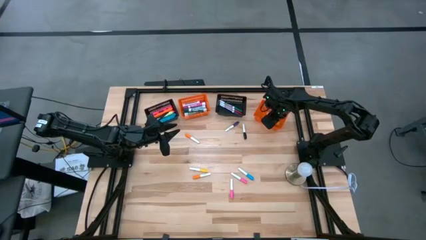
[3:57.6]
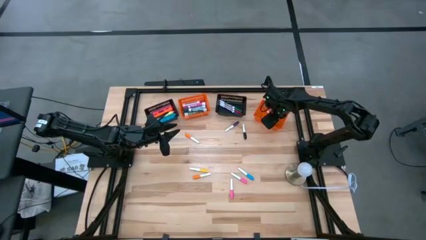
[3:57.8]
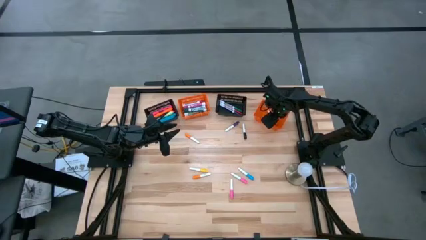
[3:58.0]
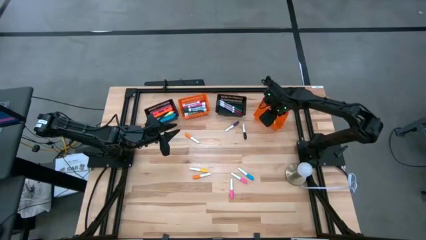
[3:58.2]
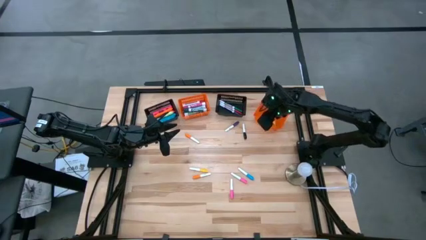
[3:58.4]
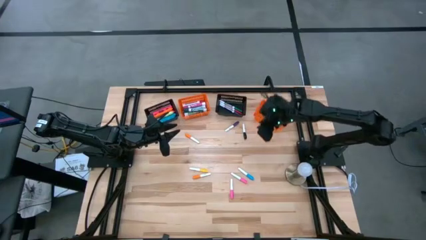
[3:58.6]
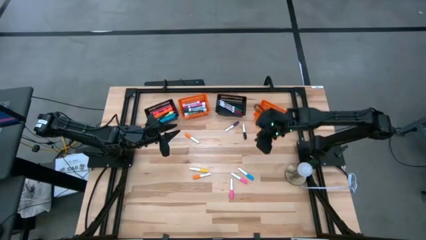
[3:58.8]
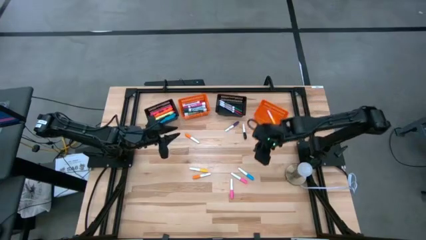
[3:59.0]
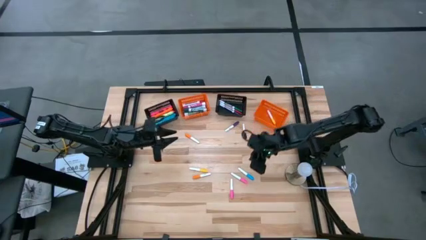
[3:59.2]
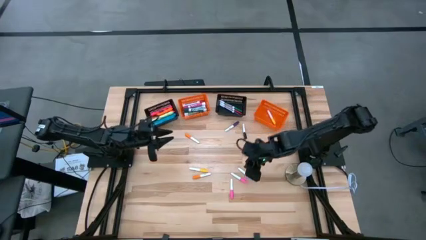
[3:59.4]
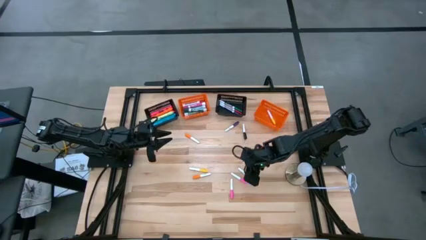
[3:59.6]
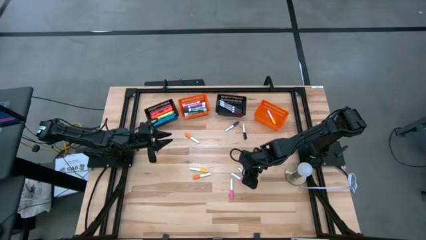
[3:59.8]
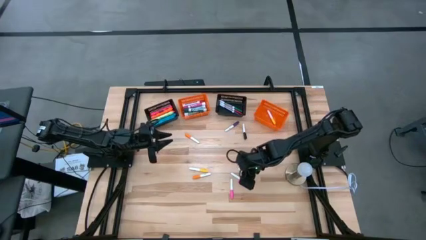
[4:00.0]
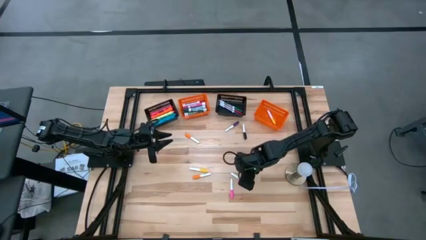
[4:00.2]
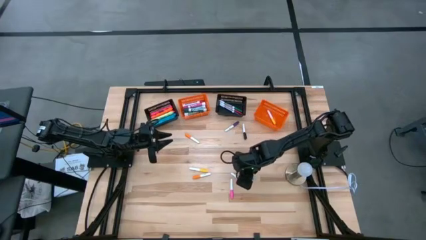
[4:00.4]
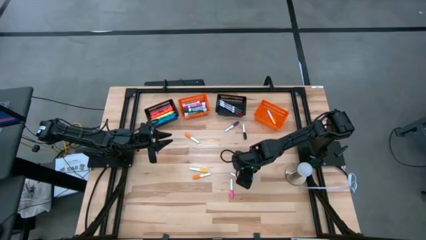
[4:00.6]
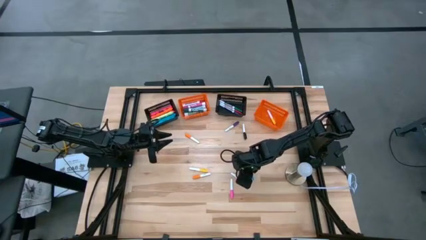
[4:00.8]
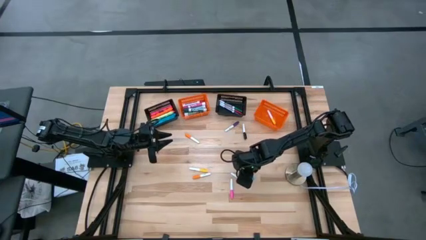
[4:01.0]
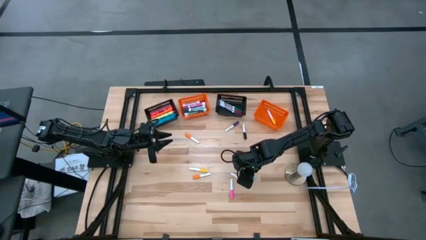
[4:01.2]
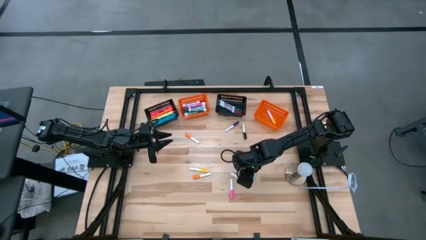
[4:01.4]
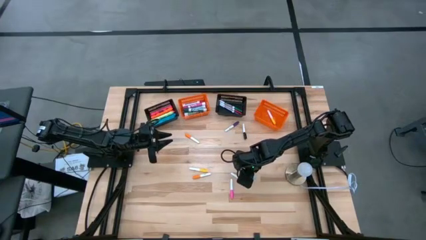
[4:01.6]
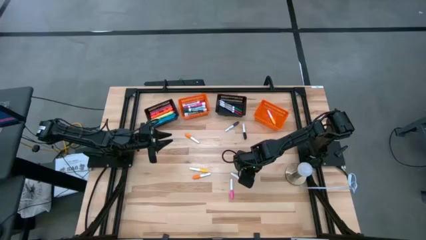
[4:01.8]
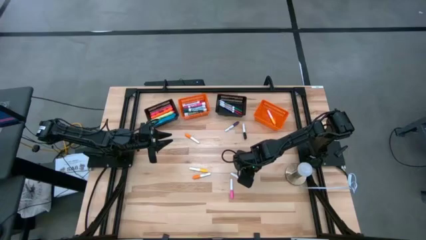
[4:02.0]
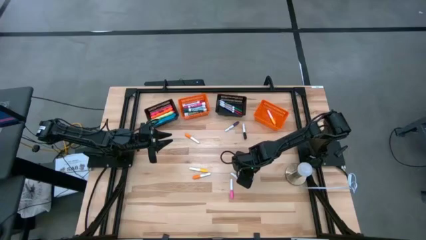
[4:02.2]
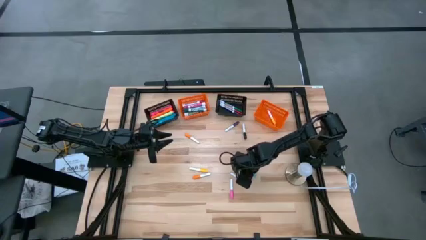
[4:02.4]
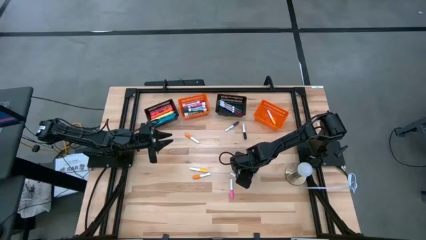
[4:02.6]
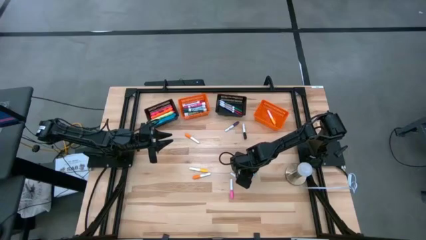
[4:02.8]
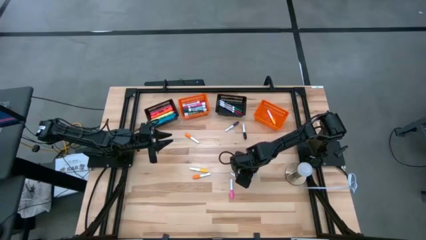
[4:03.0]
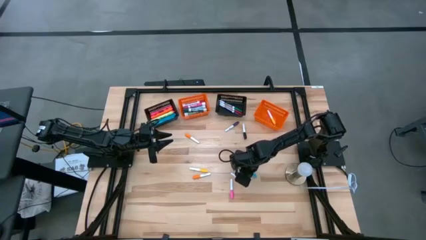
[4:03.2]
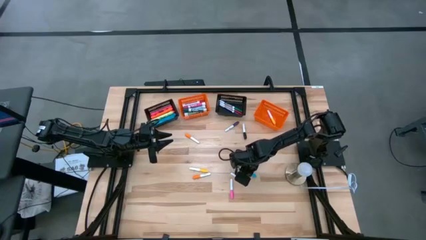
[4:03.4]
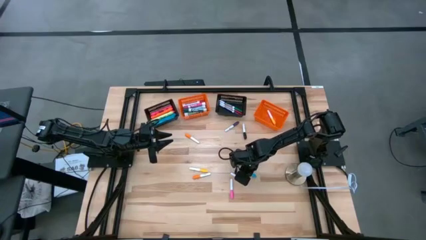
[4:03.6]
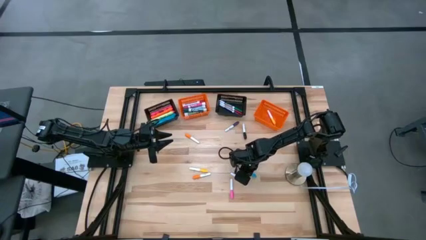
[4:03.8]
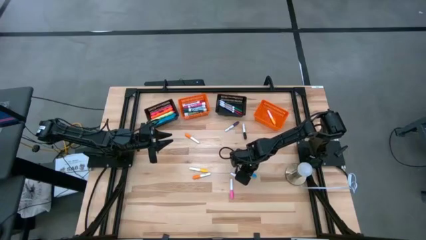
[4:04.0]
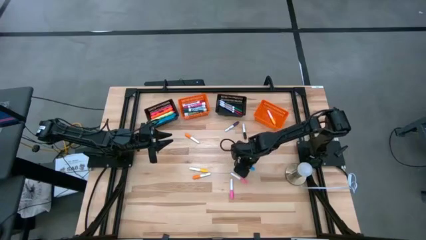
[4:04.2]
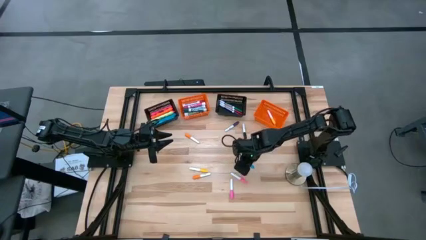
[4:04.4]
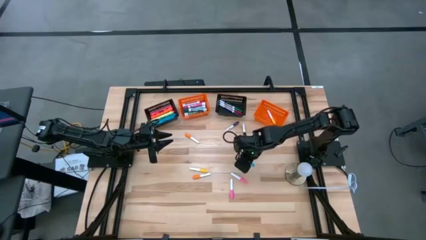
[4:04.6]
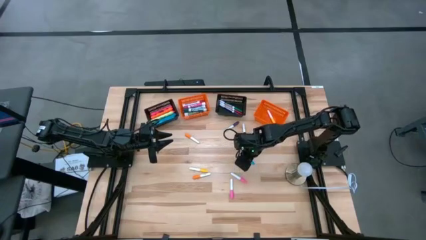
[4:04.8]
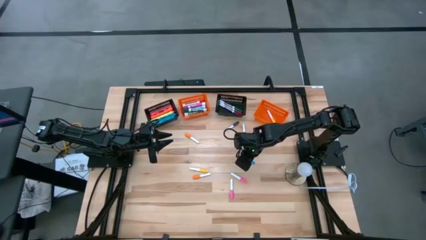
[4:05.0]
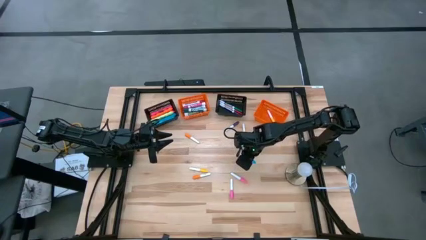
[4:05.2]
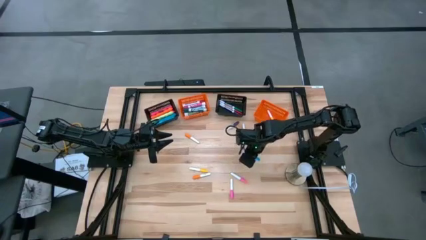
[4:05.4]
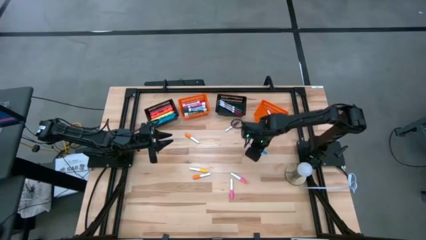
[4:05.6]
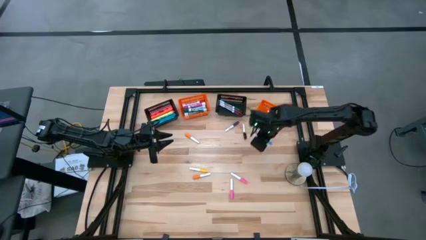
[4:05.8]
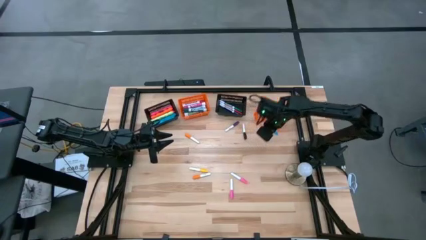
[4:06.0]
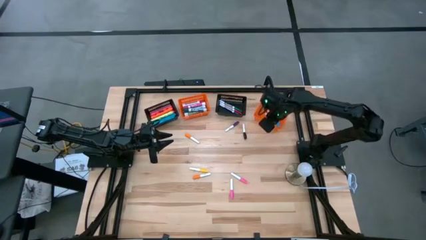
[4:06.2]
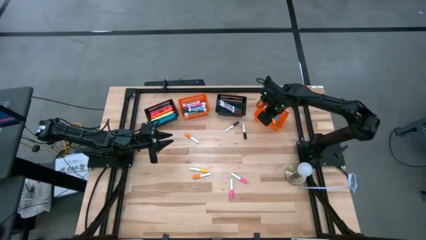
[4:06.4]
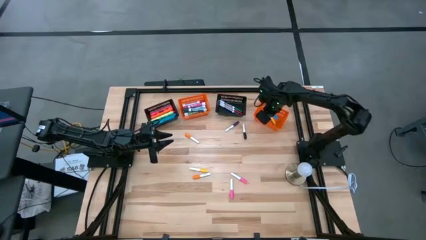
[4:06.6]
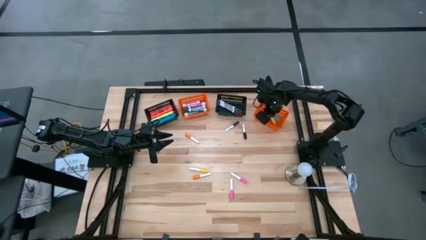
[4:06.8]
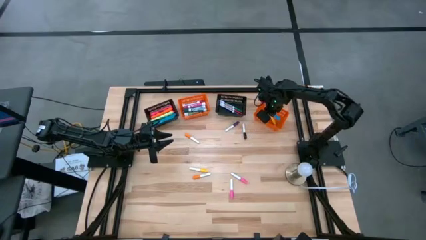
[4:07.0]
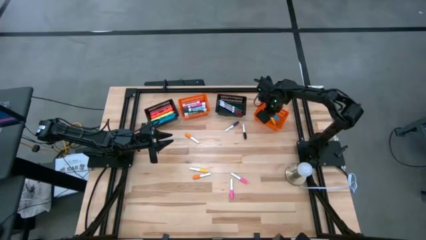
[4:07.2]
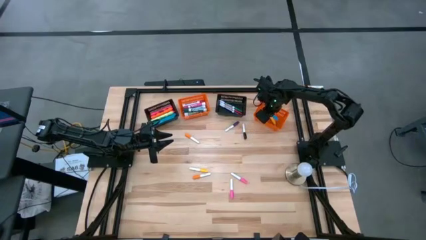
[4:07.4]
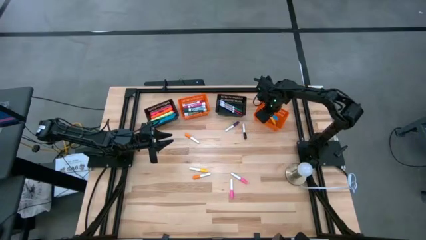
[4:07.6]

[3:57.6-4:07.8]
Task: Pick & Place Markers
Put the blue small highlighter pen into the left orange bin

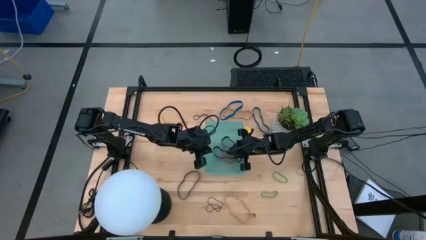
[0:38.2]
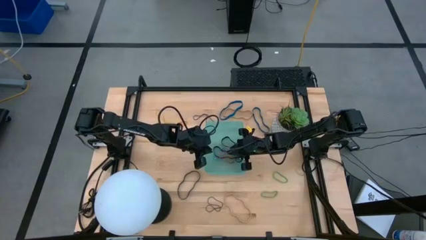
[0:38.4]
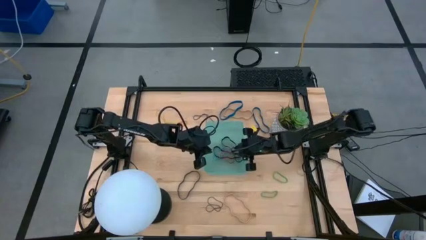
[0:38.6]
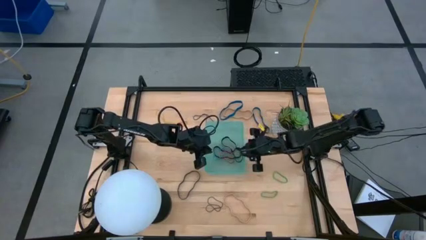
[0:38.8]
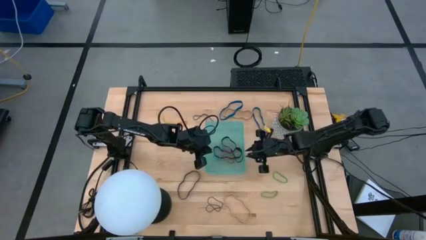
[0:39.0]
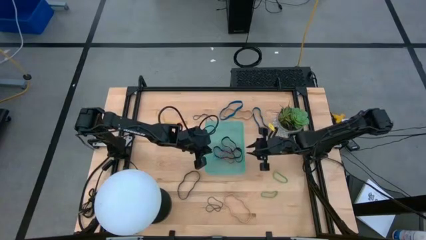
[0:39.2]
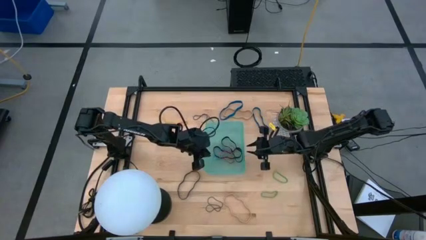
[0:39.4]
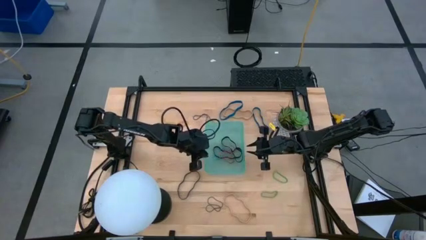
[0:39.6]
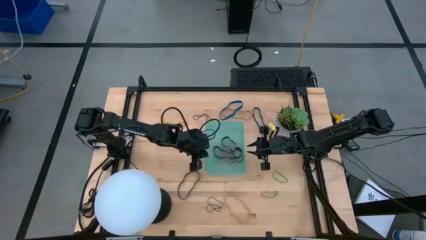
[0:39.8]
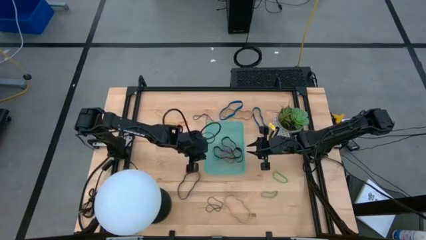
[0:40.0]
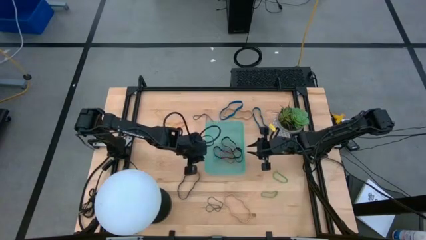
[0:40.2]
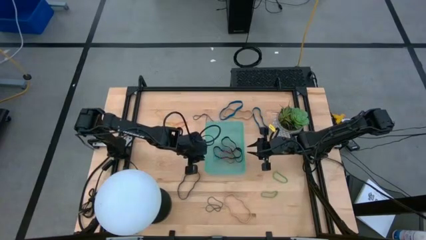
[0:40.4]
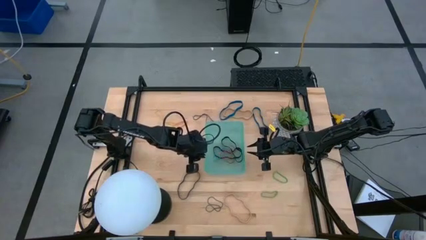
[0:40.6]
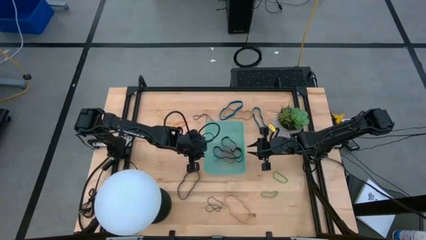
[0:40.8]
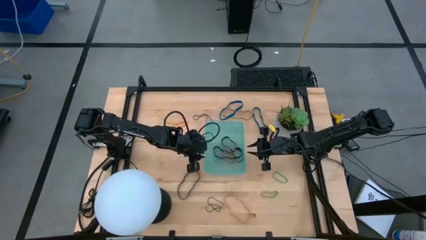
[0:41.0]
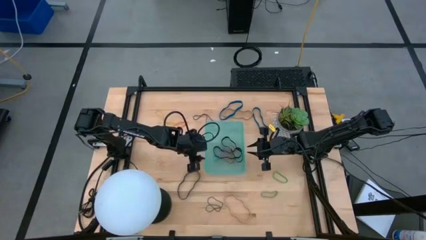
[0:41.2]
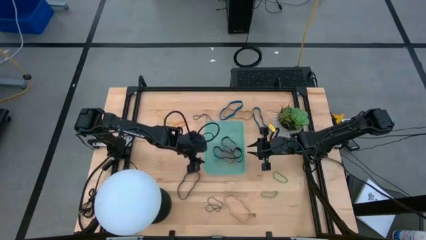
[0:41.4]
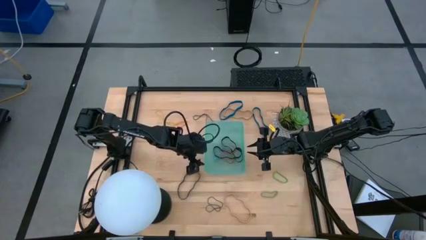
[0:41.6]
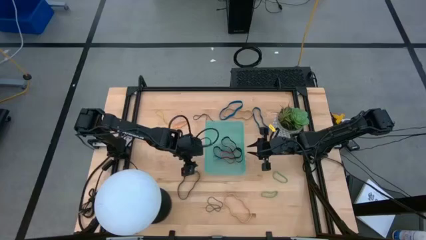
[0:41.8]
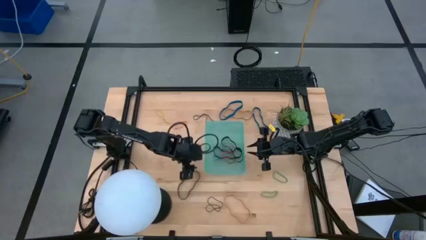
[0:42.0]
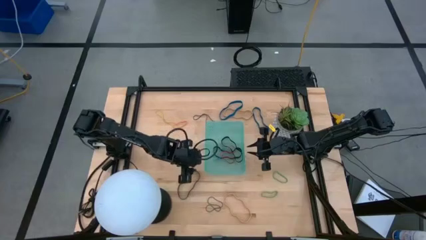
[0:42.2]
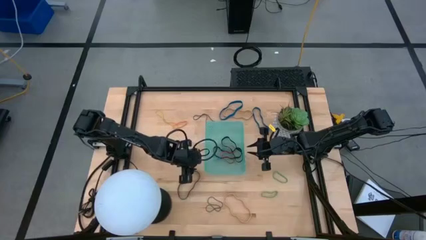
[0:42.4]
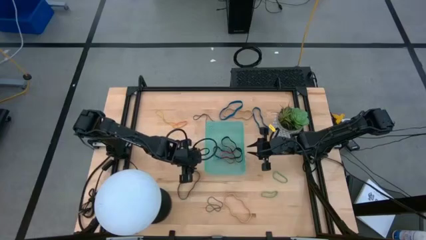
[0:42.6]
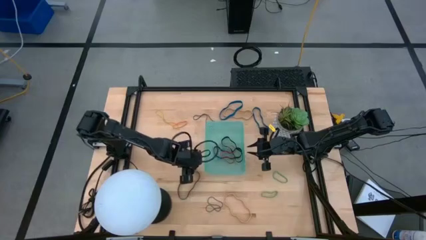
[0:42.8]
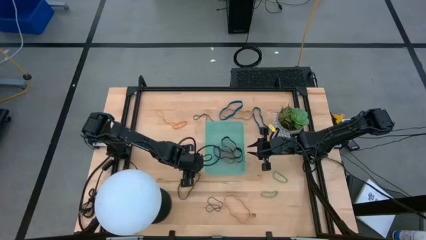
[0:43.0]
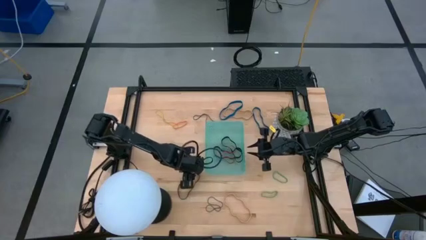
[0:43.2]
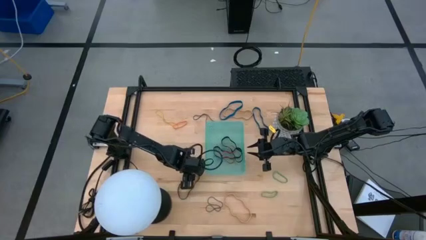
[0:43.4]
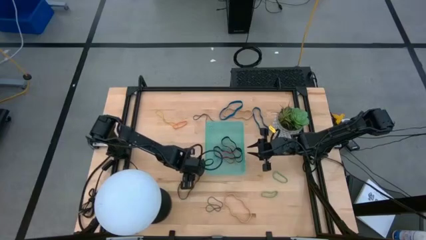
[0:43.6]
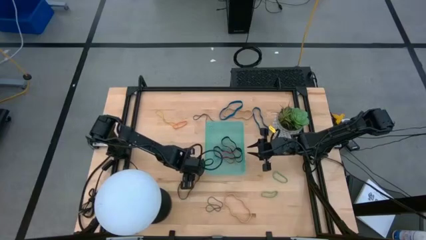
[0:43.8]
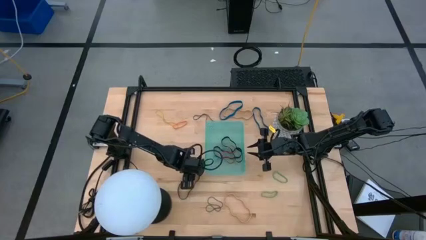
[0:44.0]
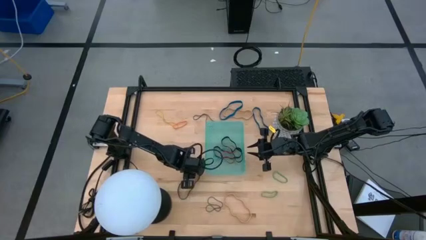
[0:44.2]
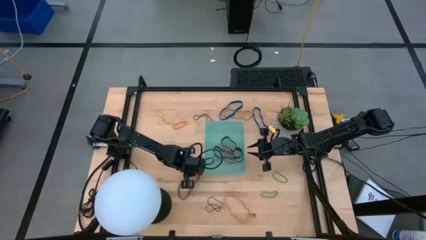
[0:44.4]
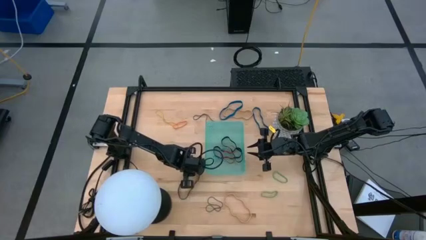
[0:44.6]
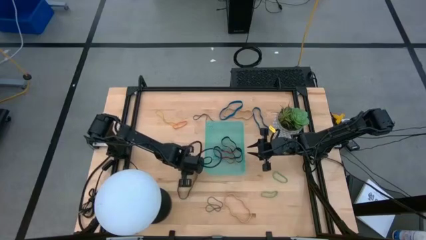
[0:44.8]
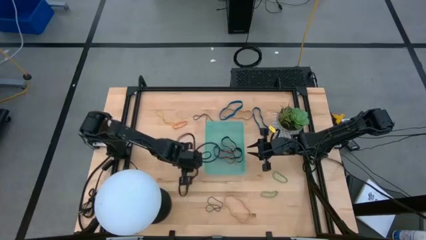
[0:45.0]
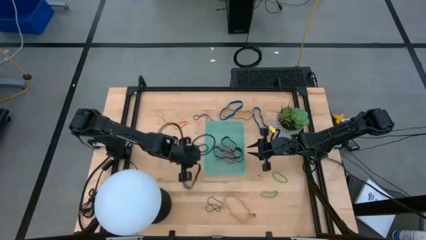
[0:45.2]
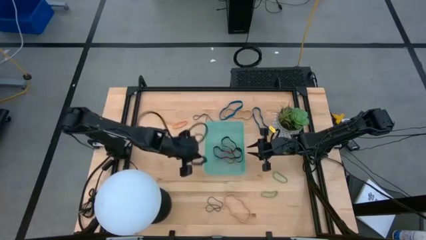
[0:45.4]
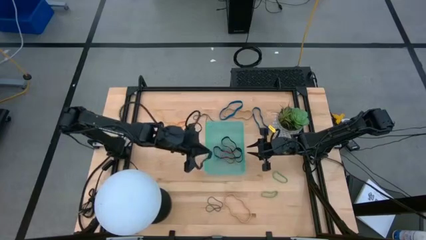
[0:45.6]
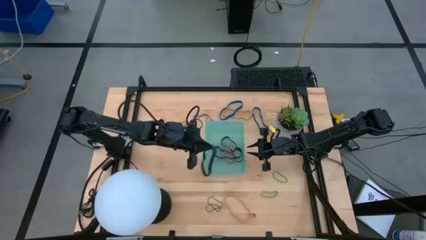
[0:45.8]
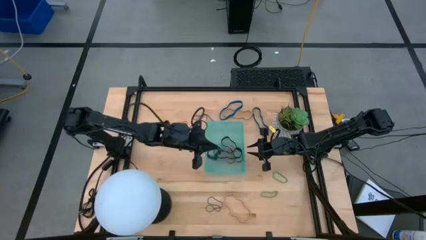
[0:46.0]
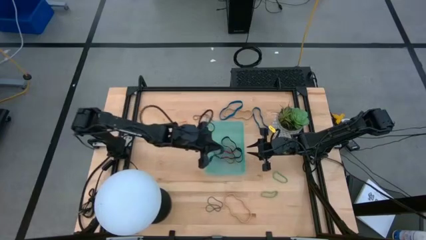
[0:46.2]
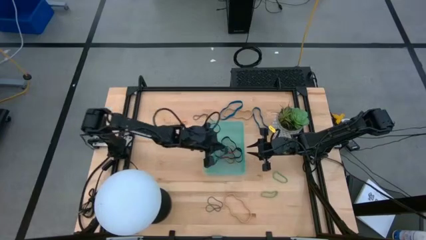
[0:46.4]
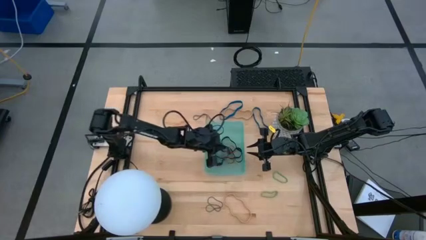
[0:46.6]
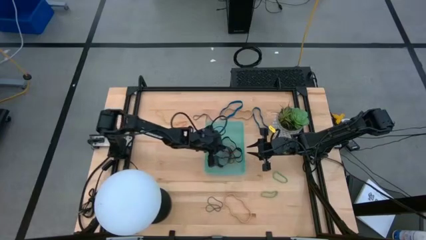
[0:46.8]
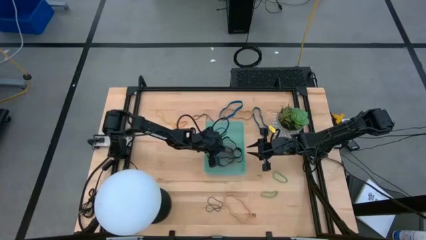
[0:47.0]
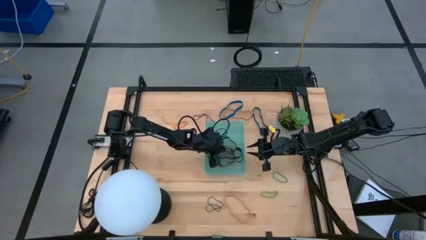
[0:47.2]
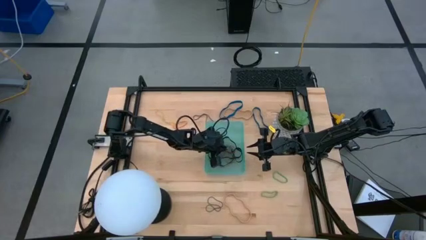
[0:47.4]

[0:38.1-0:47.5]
Task: Pick and place rubber bands into bin
Put the black rubber band into the green bin
